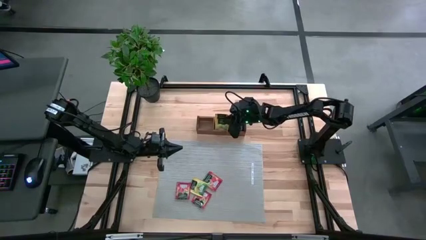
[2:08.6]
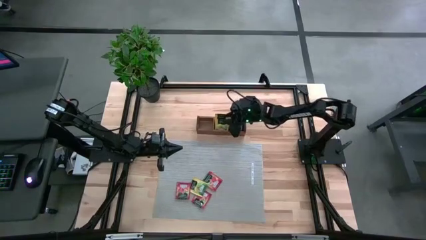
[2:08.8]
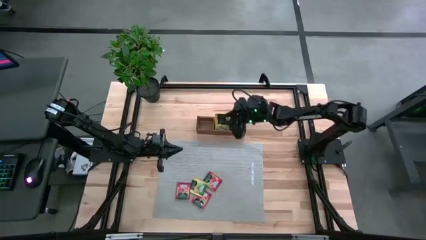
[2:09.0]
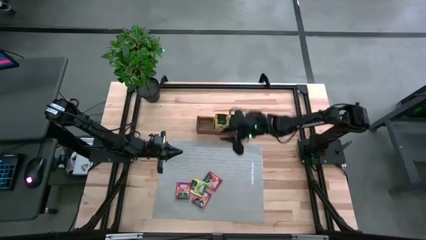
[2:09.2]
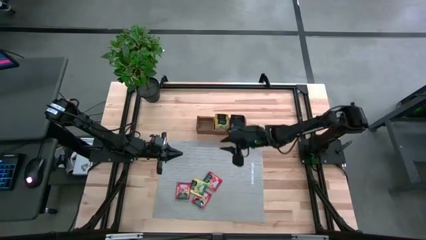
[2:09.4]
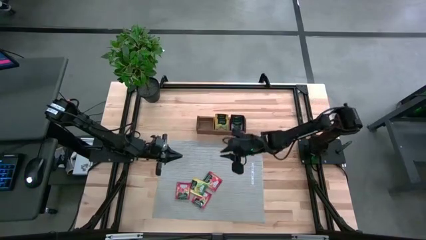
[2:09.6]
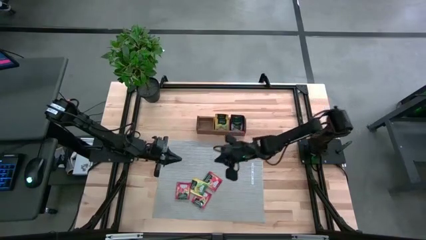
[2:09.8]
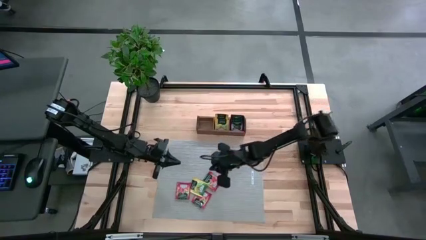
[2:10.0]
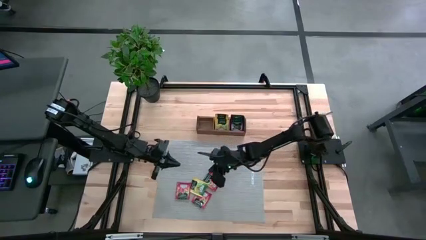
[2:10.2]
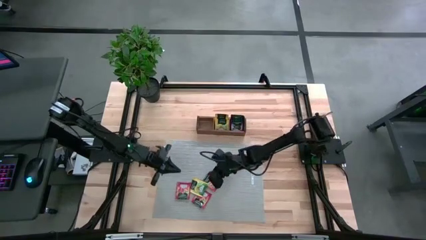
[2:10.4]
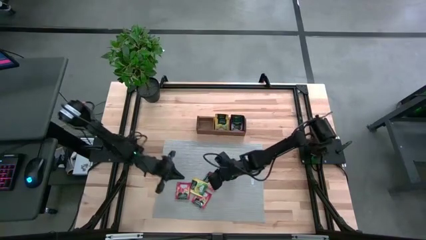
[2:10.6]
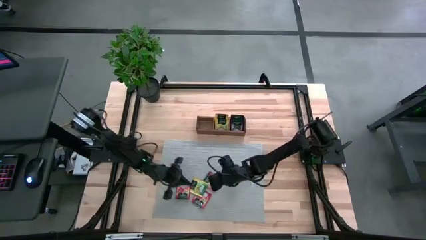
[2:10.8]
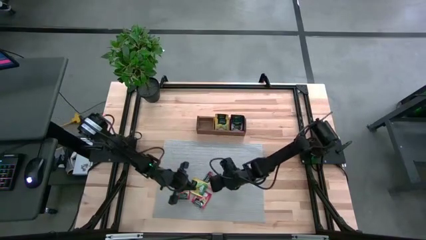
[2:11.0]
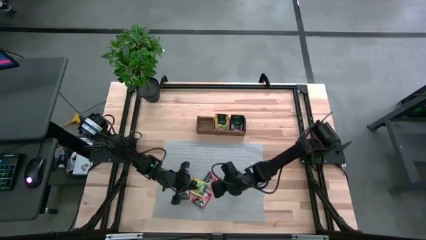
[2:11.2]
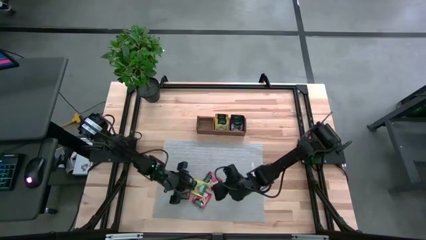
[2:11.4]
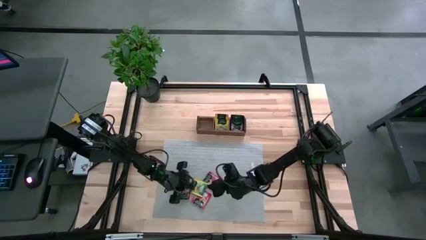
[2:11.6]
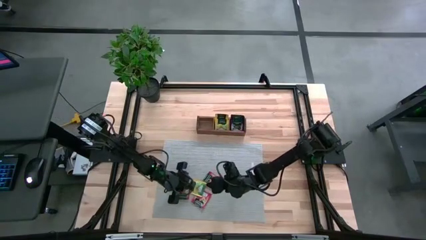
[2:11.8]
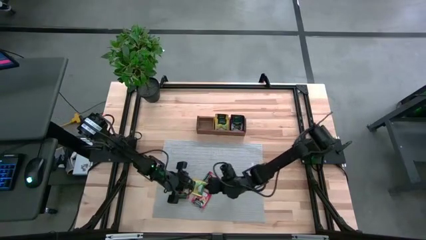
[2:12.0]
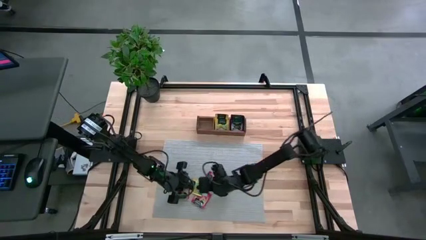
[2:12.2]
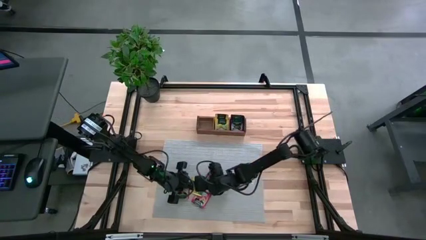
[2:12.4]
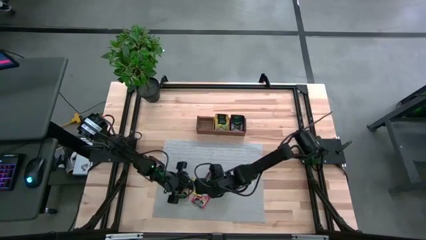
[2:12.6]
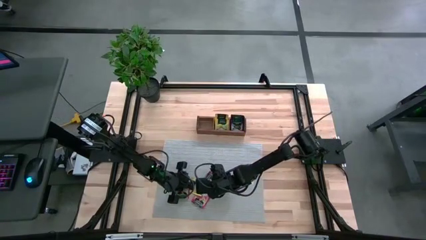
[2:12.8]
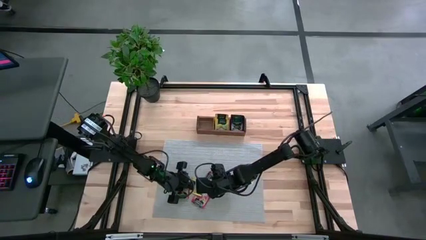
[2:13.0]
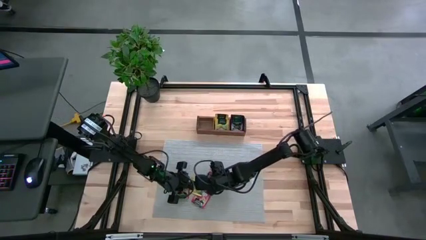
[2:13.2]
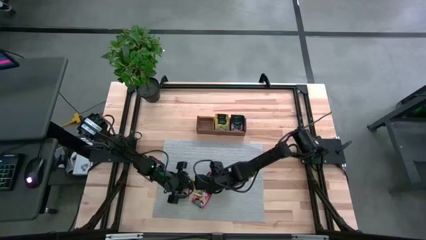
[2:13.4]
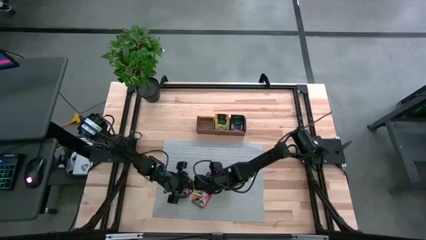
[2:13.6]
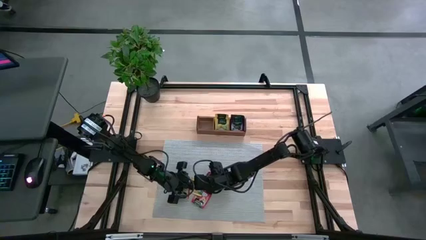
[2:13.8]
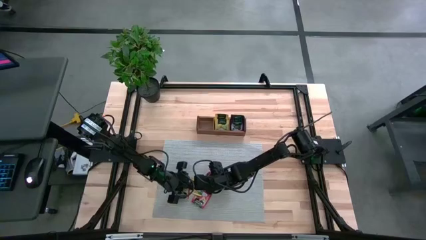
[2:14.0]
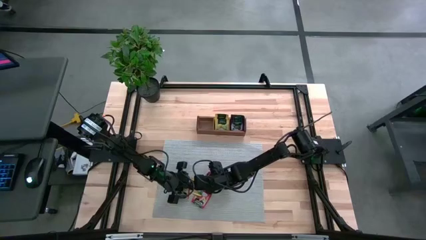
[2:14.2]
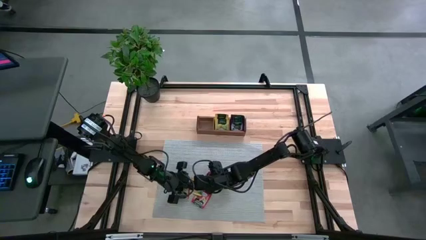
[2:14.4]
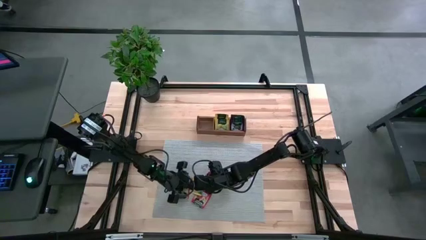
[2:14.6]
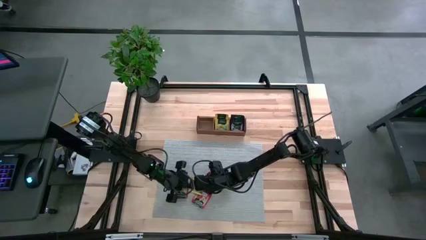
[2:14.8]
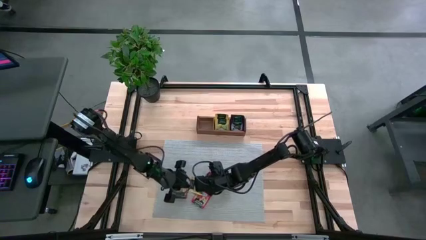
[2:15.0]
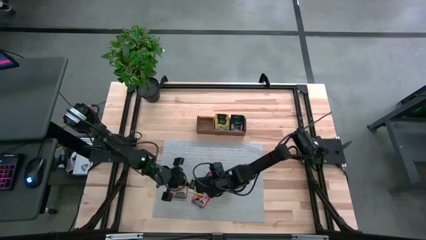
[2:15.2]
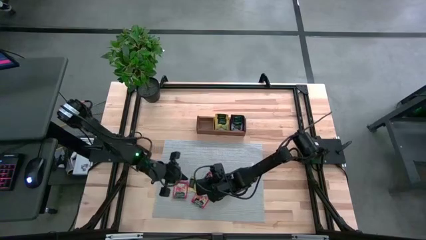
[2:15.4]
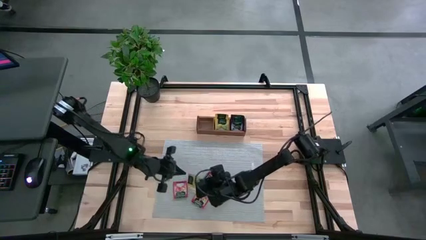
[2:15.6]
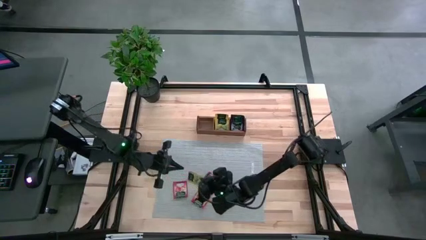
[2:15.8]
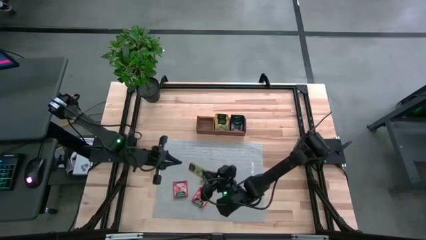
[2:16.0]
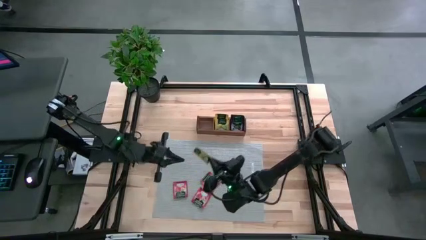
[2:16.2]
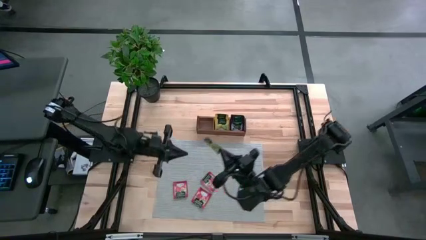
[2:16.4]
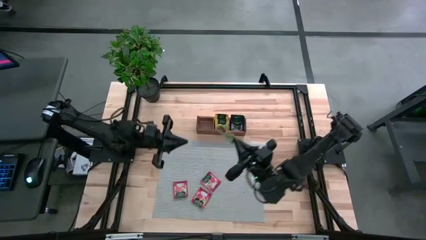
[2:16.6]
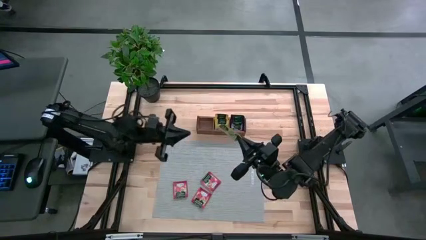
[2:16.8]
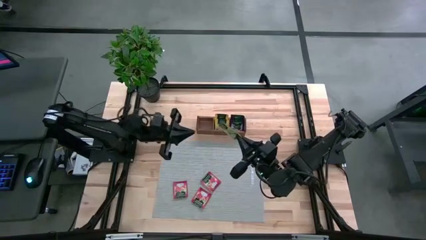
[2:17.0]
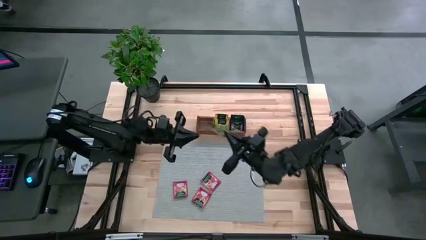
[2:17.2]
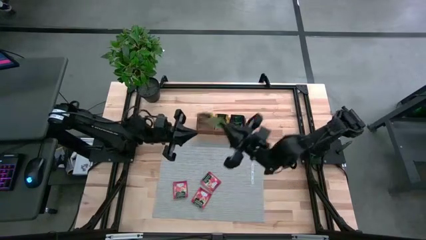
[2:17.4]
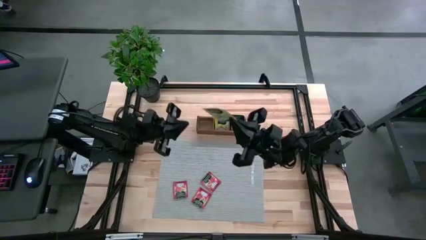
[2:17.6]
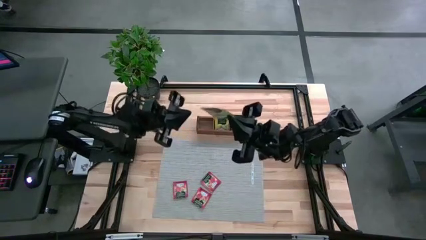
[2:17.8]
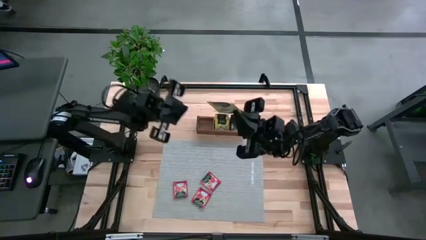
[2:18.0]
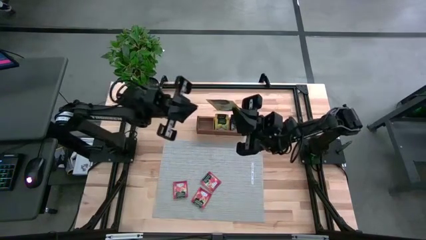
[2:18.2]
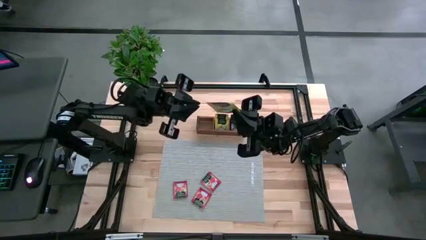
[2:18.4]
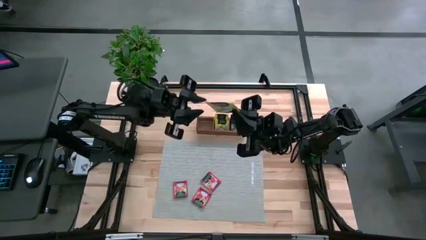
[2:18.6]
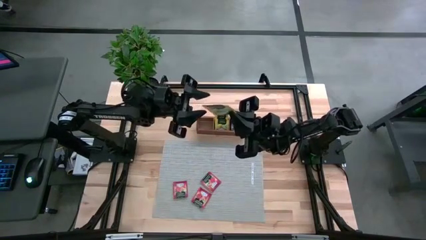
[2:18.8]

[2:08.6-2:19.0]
Task: Pick & Place Tea
Put the yellow tea bag into the middle section of the wooden organizer

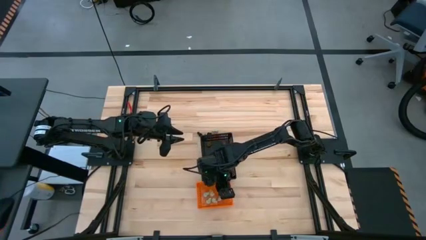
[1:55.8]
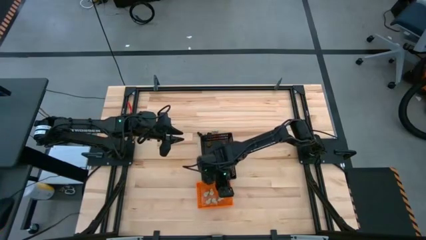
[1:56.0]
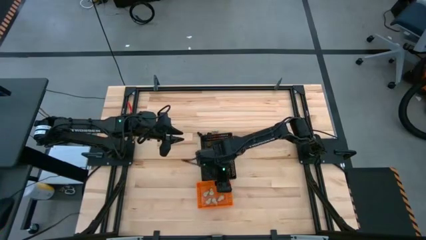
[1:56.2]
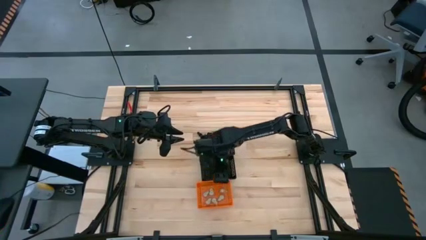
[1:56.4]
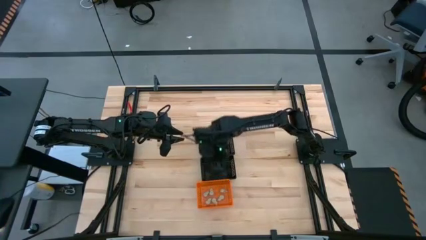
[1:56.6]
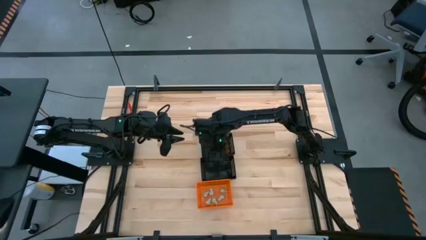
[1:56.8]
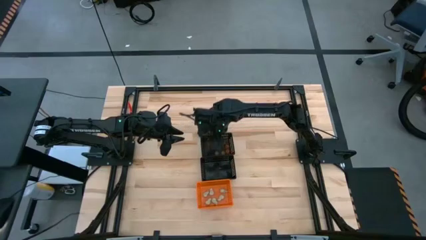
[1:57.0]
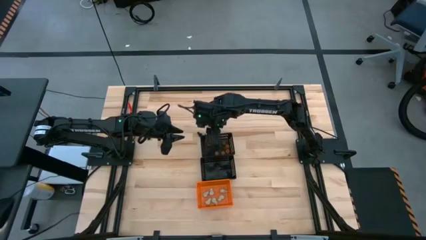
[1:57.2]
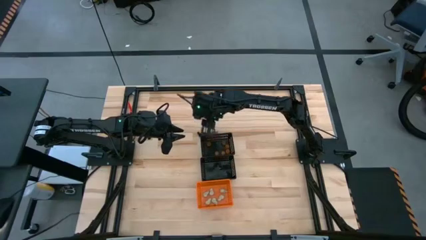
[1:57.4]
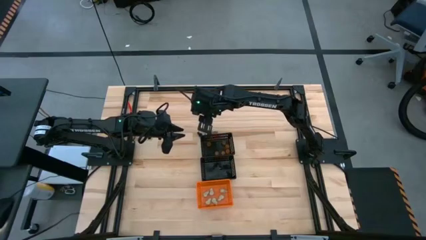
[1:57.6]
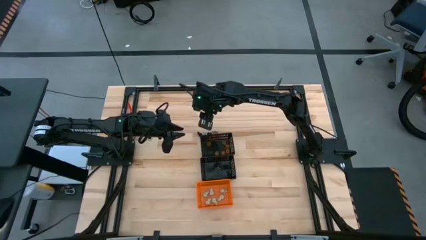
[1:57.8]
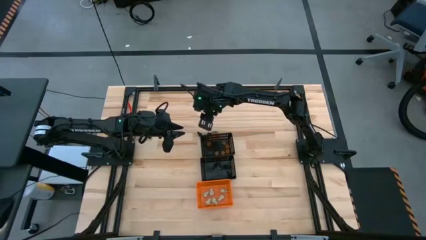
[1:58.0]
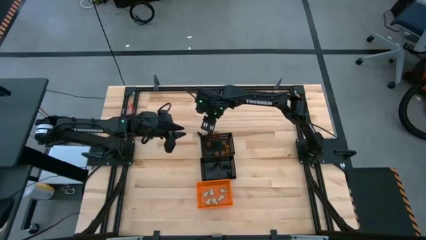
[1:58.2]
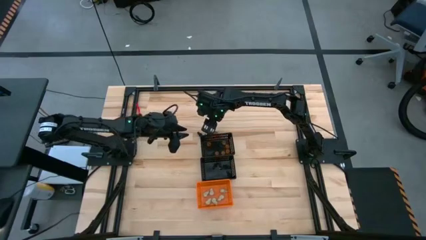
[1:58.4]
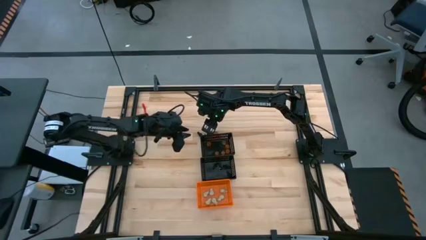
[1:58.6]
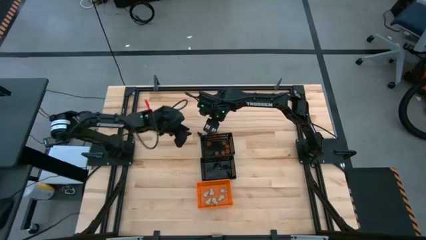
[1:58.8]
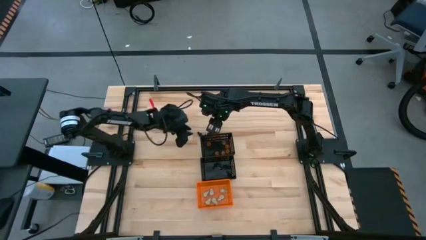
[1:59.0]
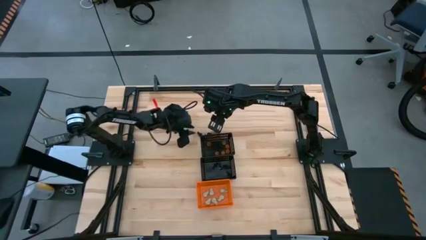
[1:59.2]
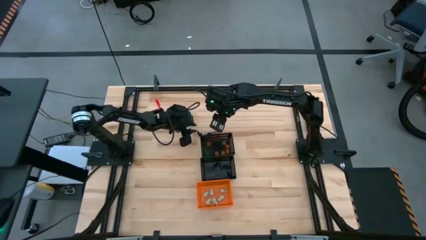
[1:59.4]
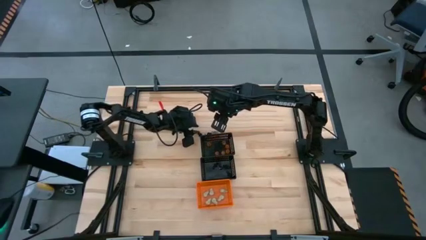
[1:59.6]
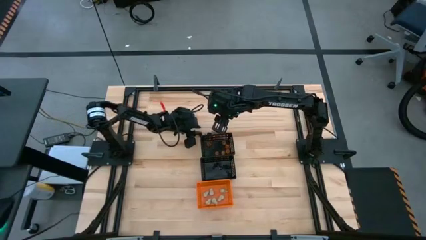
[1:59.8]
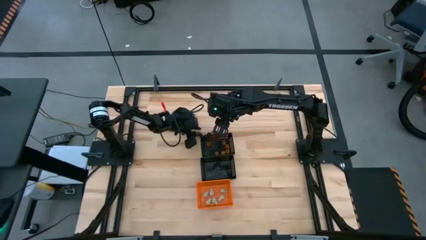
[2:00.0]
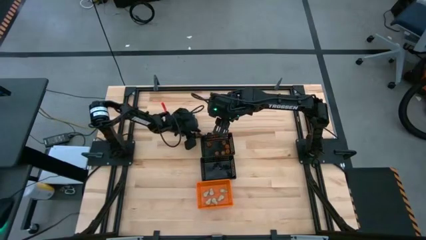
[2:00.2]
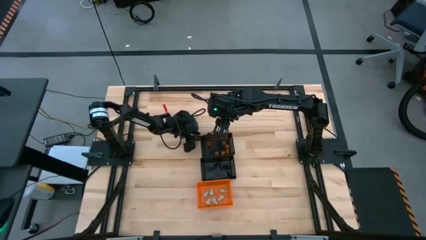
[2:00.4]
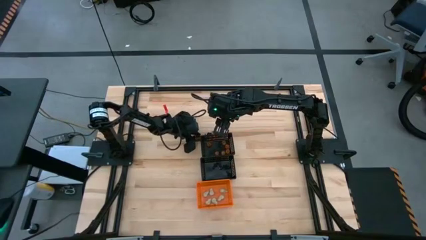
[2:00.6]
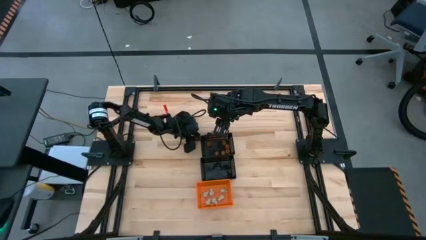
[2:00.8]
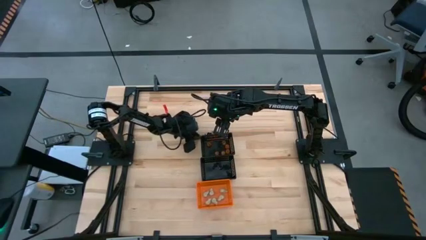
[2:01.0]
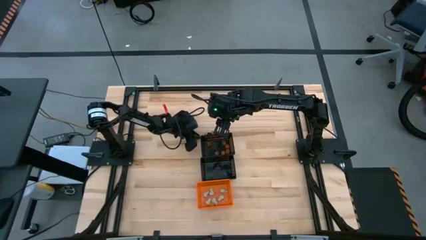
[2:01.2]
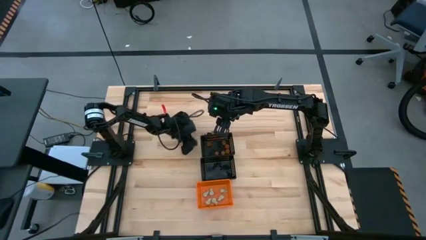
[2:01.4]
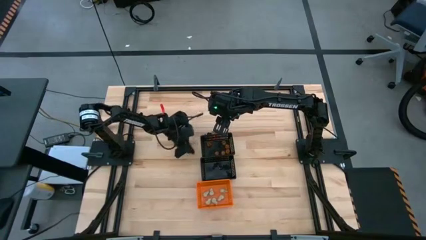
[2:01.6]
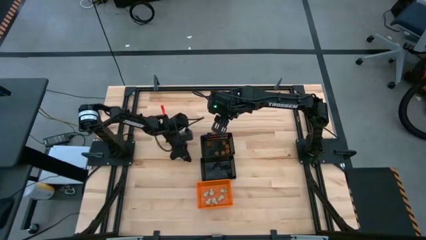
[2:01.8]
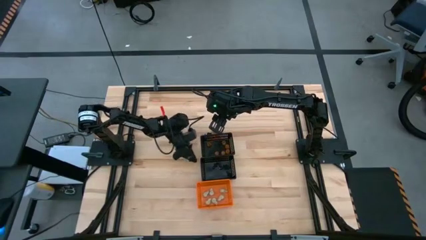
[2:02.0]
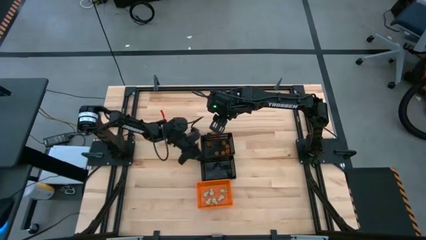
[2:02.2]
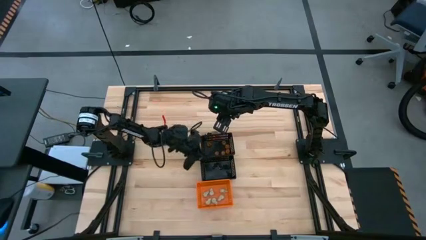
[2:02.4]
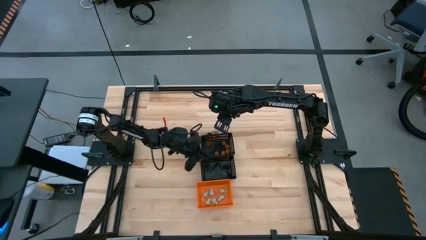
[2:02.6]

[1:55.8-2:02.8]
Task: Sort Halloween decoration
Put the black skeleton toy into the bottom black bin
